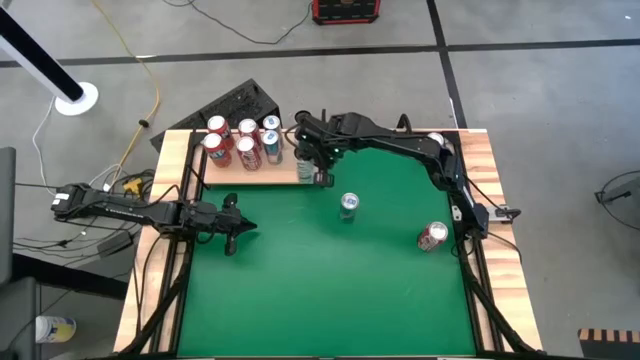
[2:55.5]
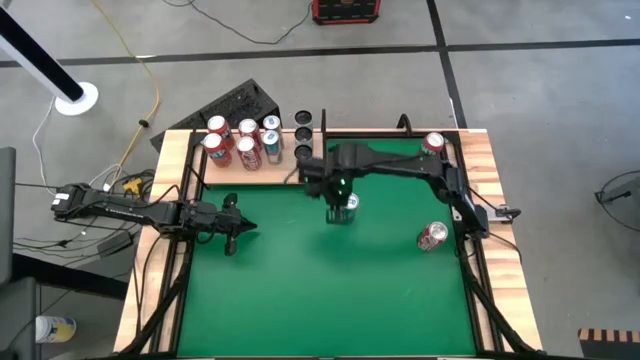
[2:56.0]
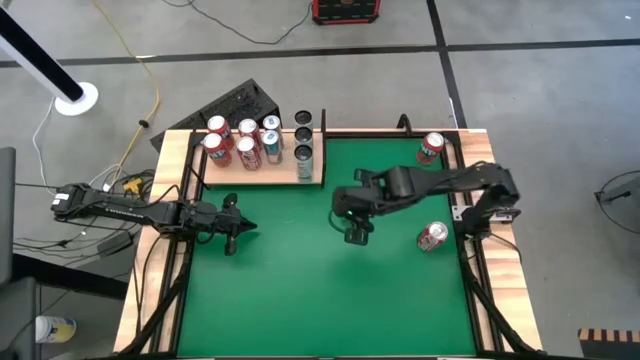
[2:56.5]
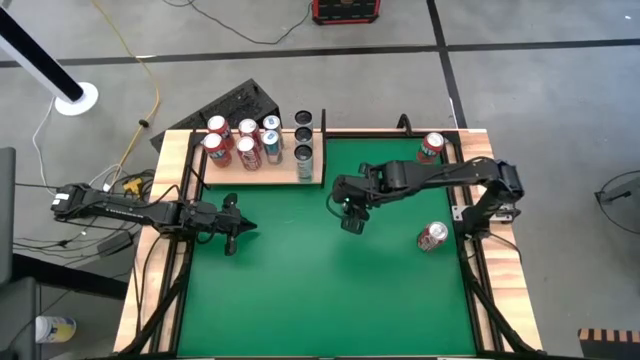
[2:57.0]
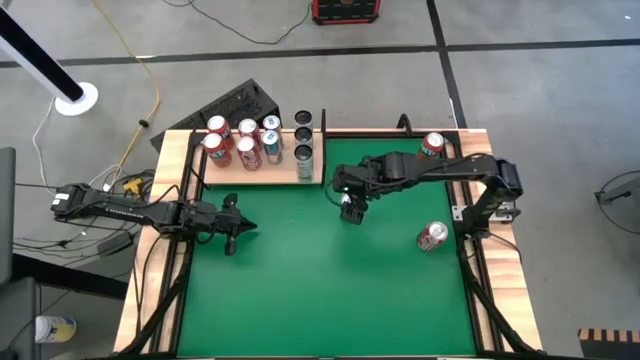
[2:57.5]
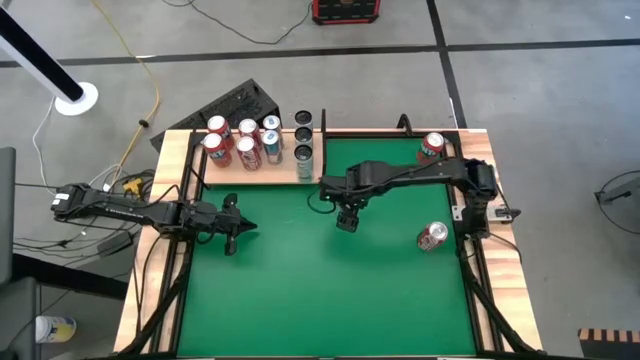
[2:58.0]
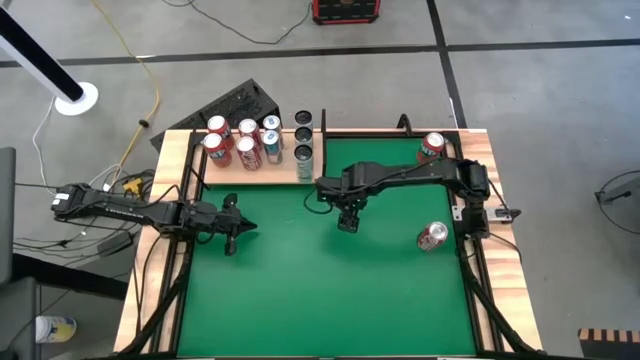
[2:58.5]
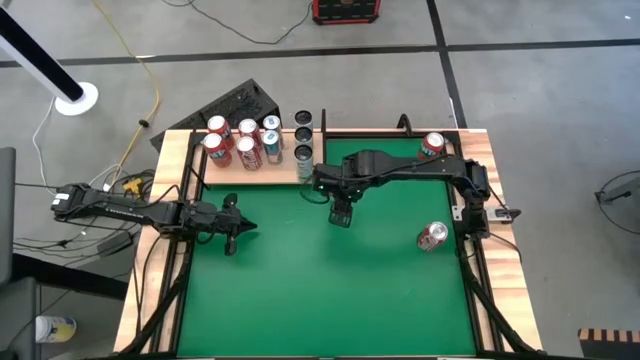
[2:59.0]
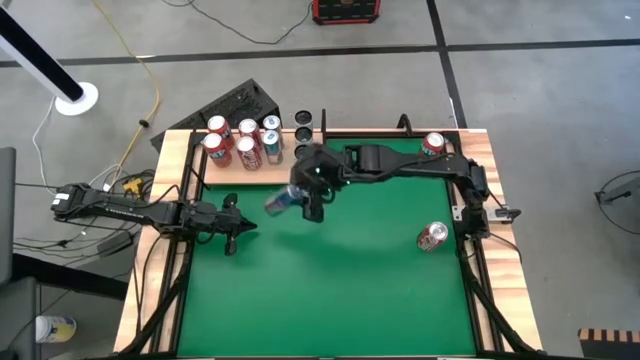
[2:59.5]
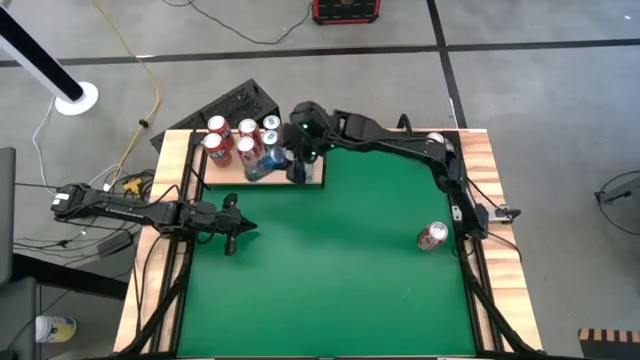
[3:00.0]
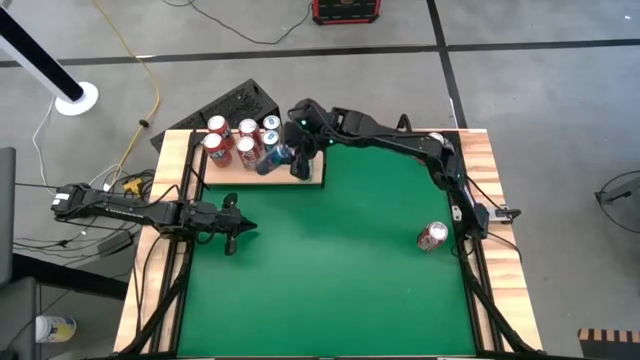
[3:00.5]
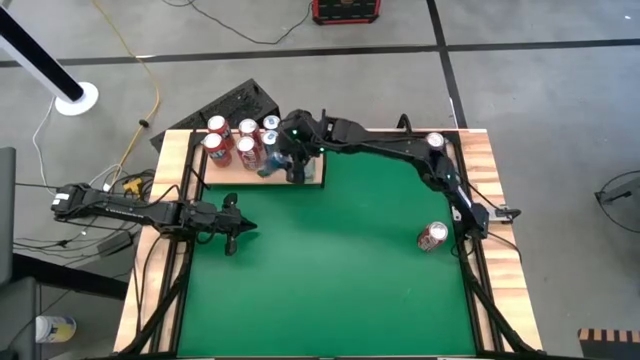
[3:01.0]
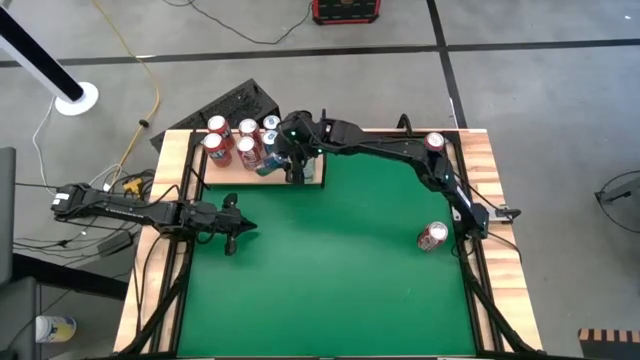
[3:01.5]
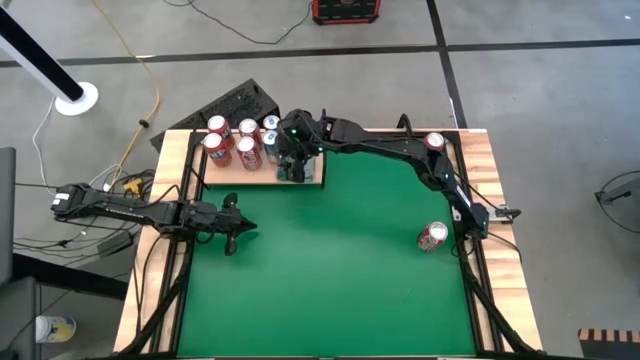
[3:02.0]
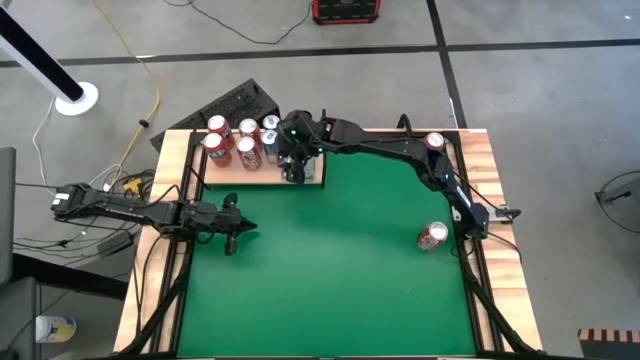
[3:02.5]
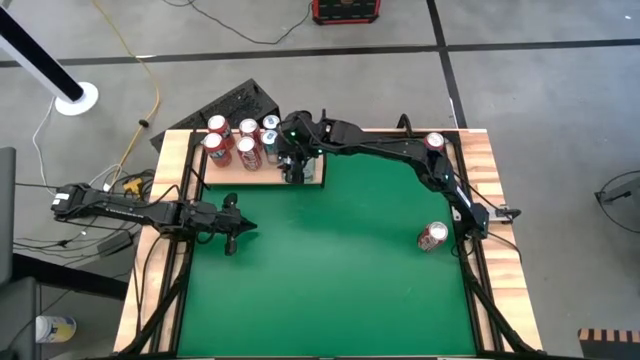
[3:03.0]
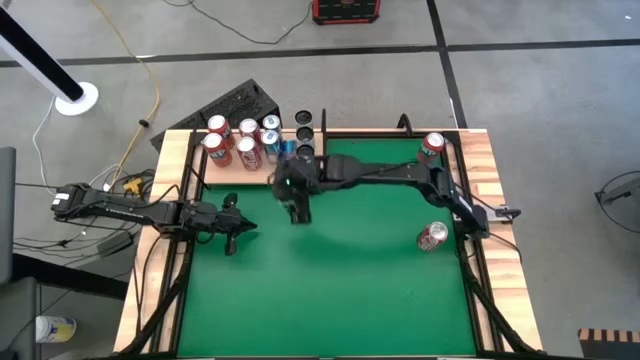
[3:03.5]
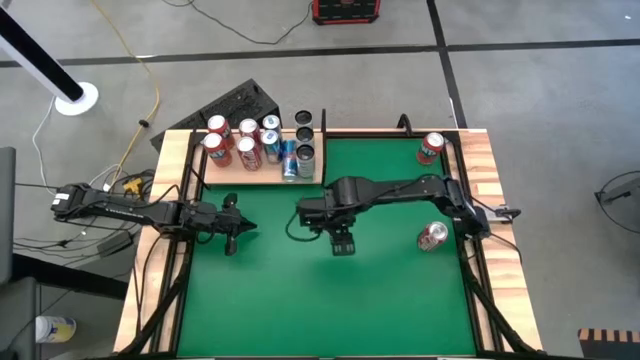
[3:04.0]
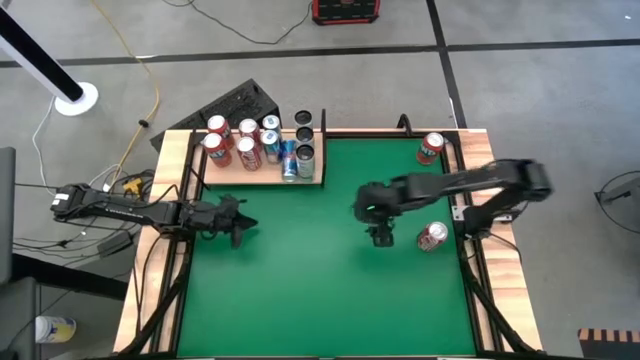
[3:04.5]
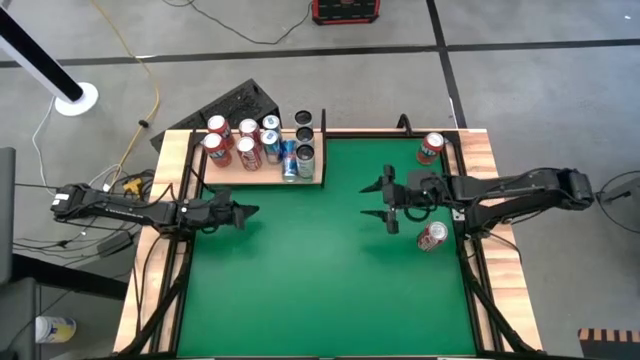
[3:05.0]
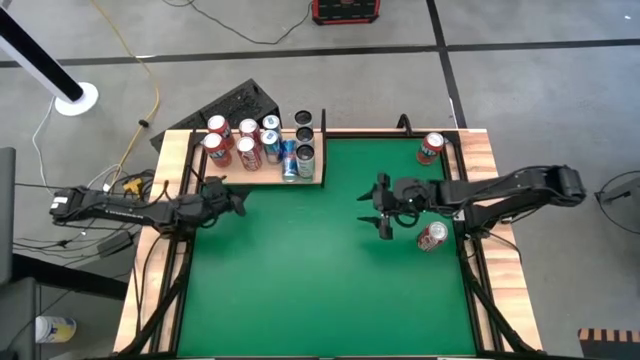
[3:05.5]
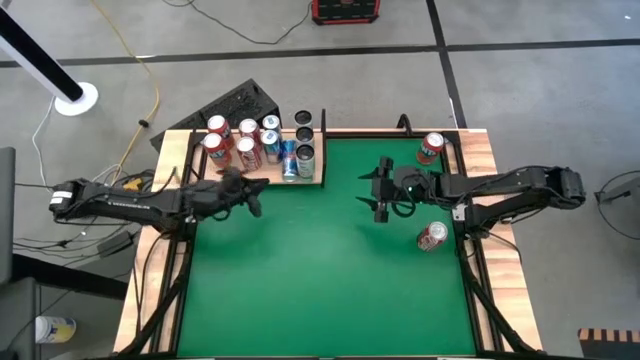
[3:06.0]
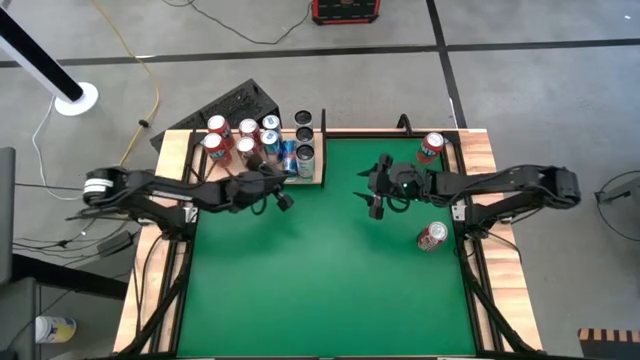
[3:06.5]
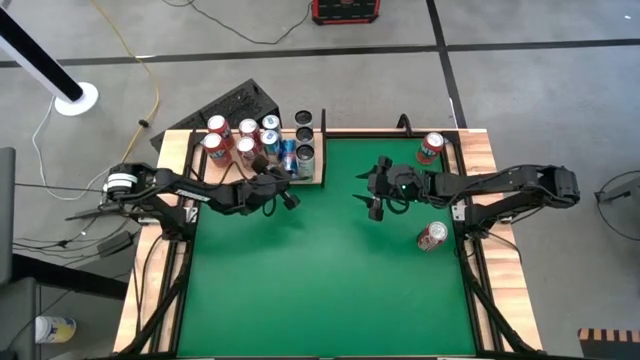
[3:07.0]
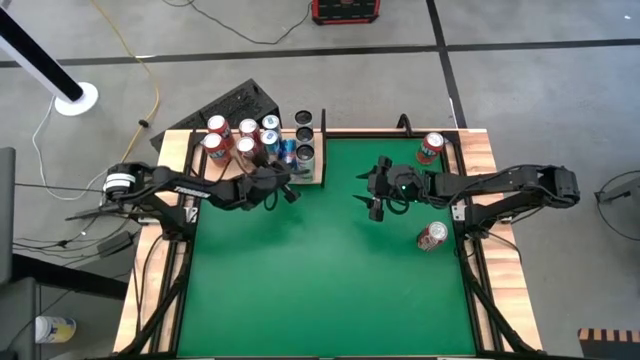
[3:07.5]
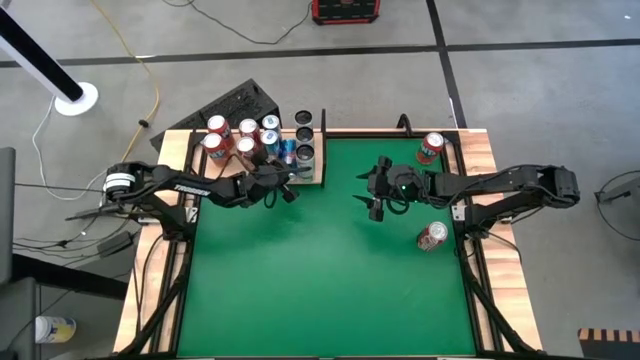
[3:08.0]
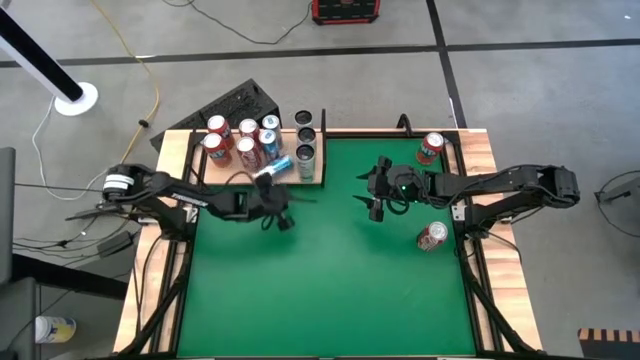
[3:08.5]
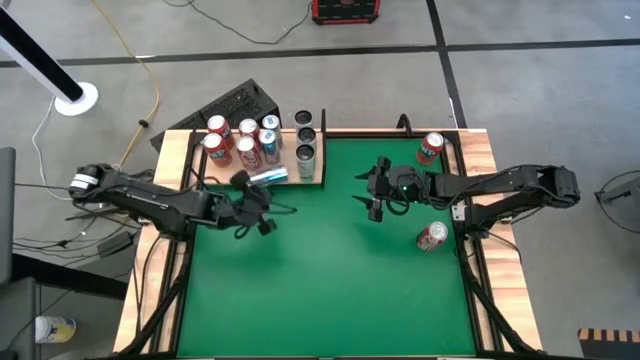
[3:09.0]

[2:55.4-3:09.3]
Task: Place canned beverage on shelf
Put the blue soda can on the shelf aligned with the other blue soda cans

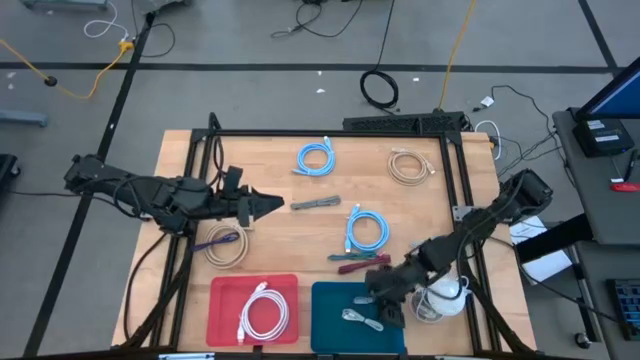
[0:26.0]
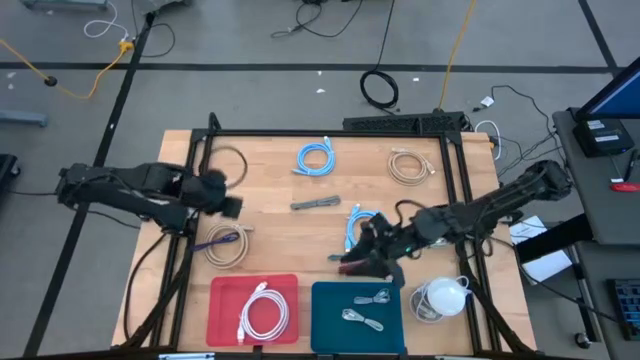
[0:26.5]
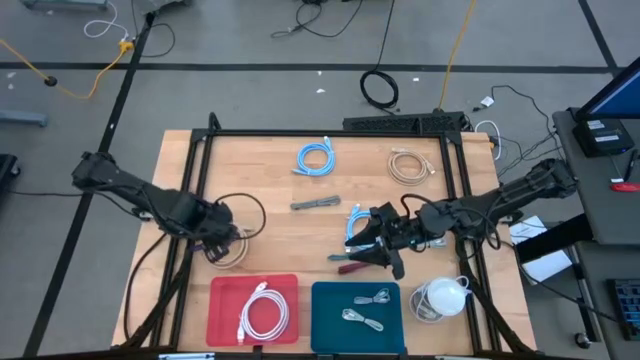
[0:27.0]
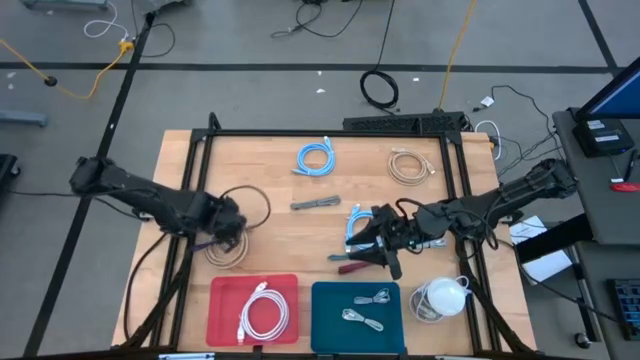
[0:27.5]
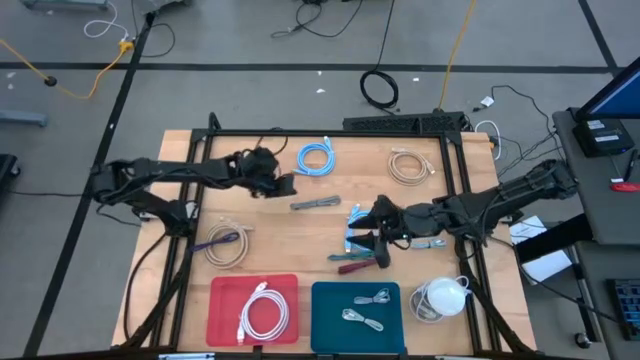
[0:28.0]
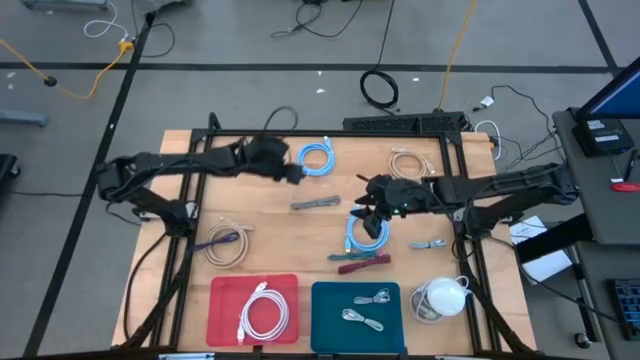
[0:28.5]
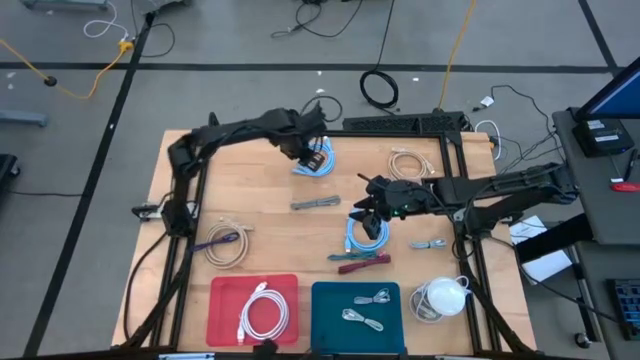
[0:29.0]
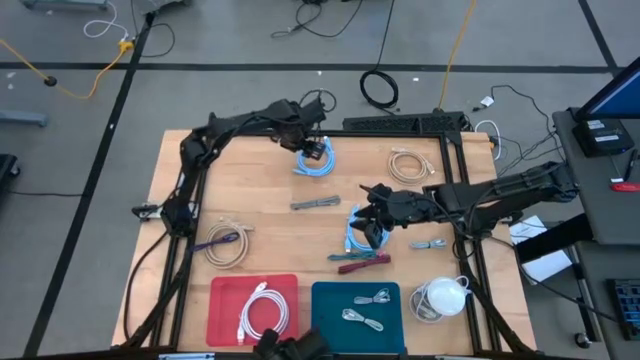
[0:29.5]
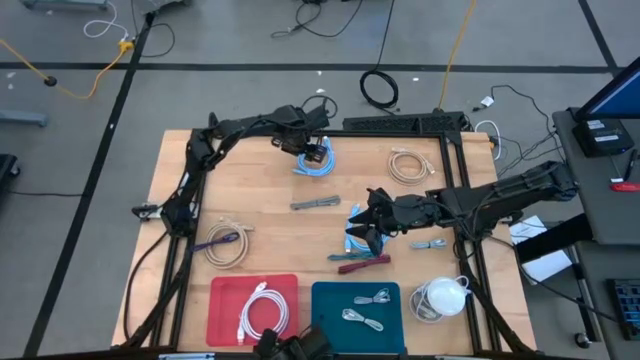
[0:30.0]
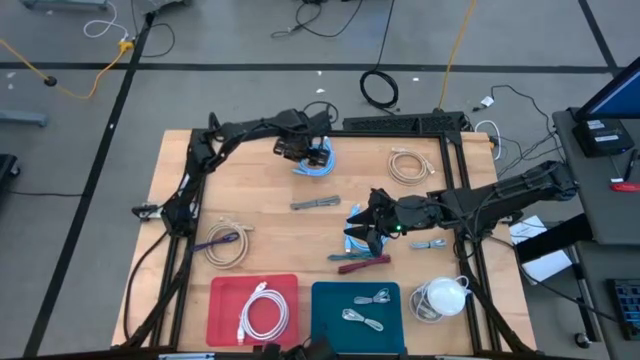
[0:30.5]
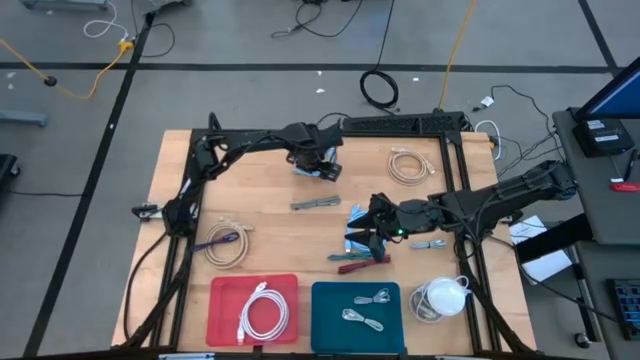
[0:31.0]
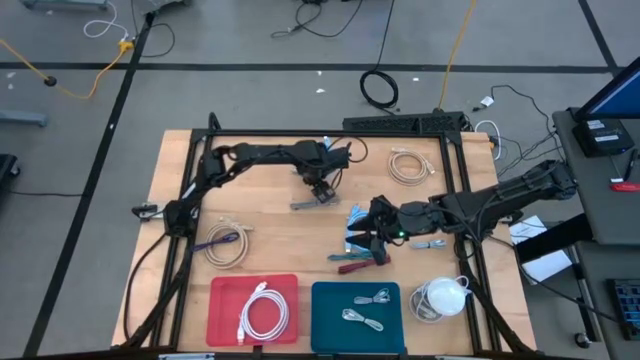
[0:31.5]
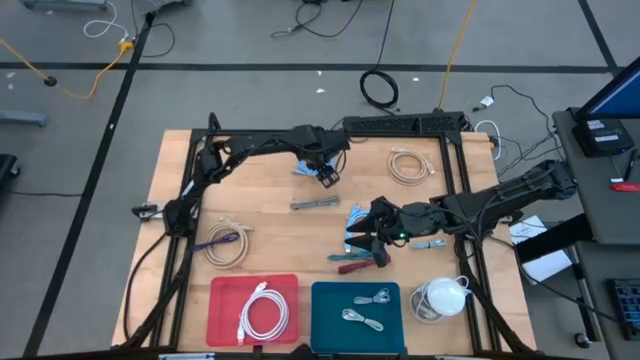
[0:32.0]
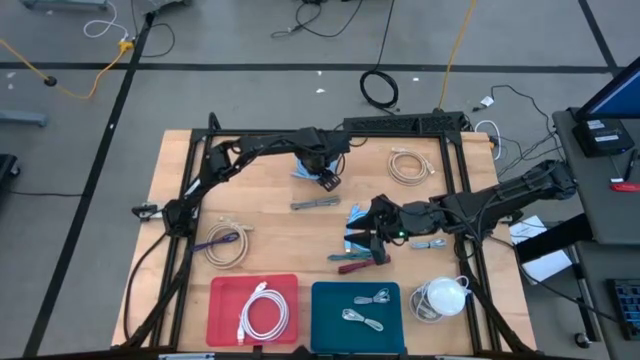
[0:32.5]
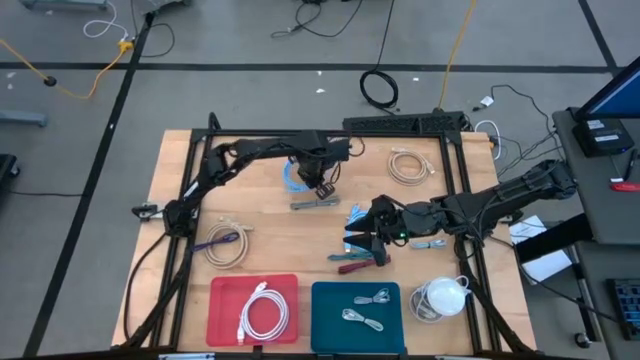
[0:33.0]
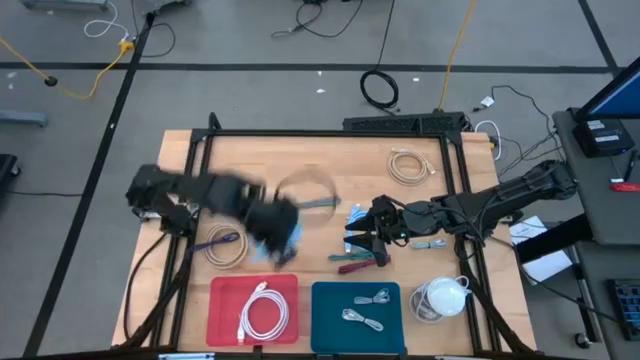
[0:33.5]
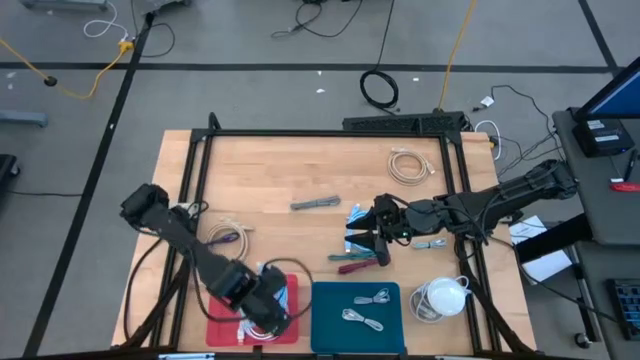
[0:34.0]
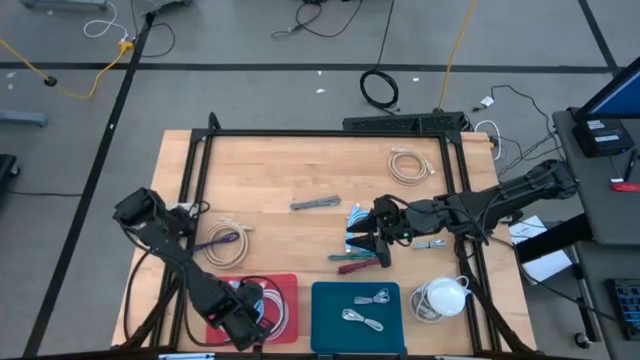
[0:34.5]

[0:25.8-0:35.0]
Task: Pick & Place USB Port
Put the top sky blue HDMI cable into the red bin
